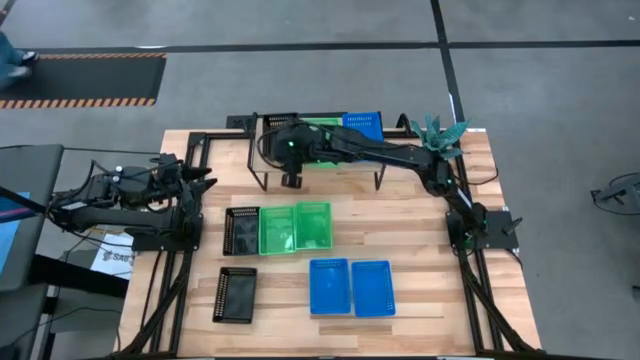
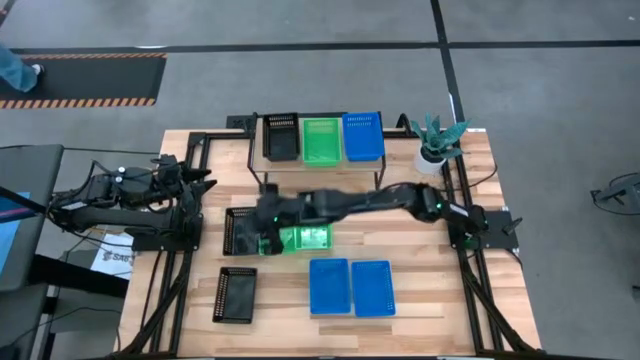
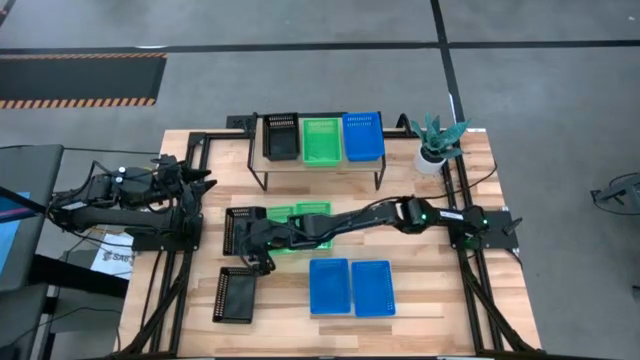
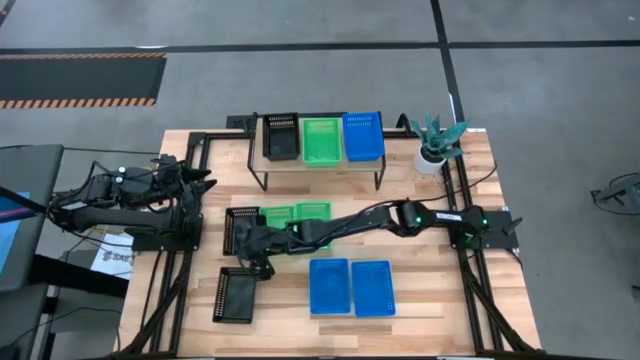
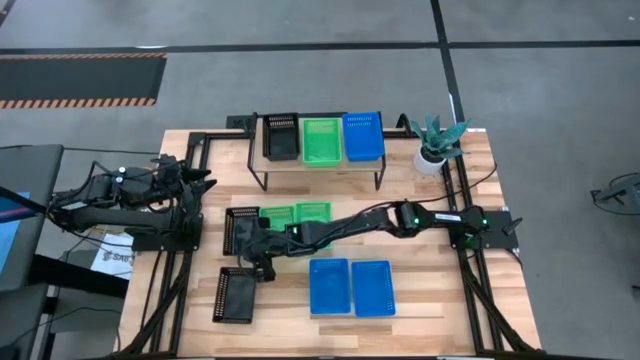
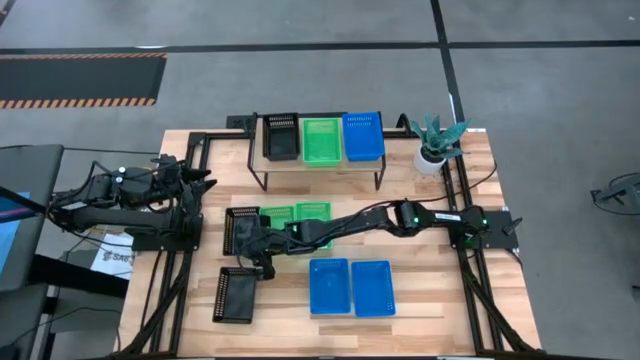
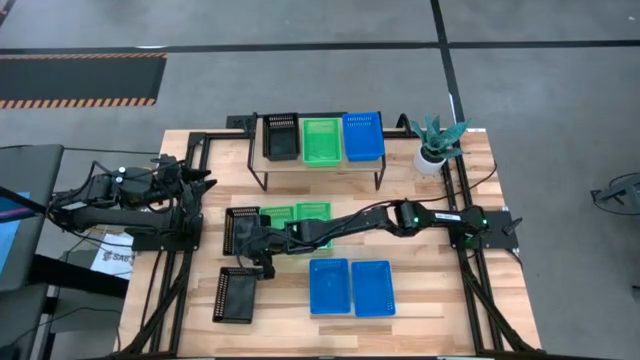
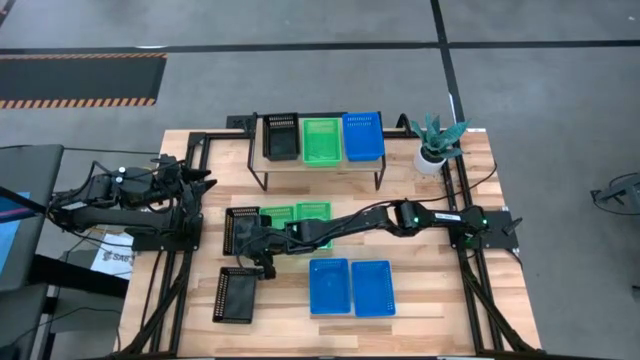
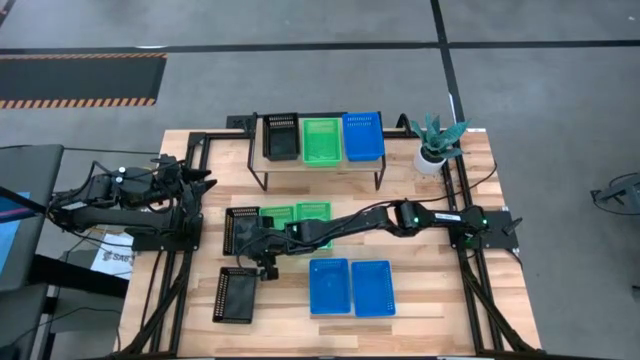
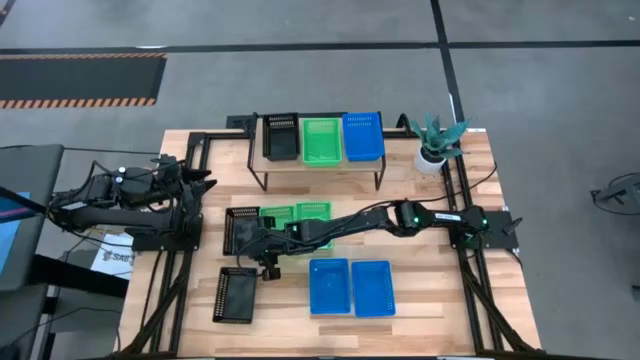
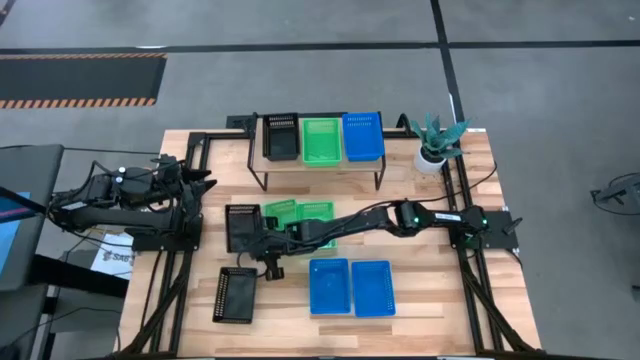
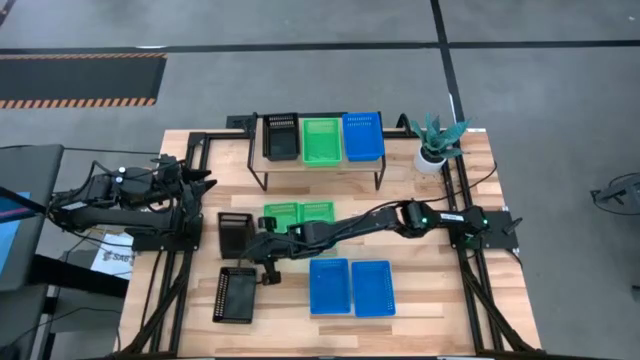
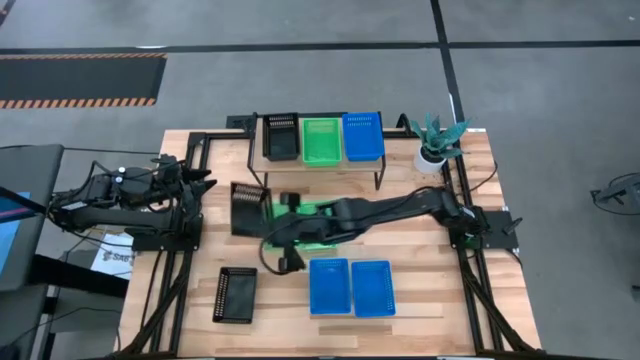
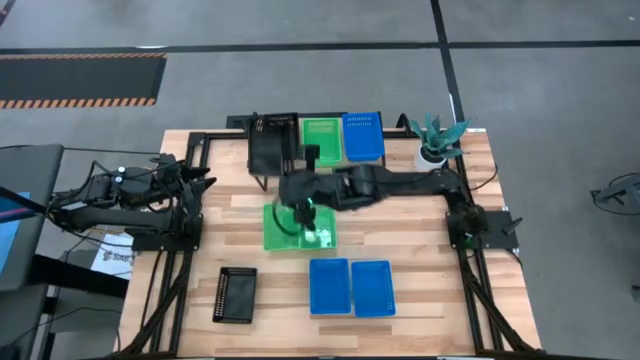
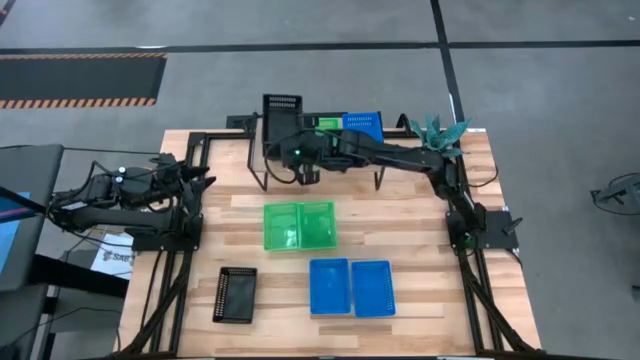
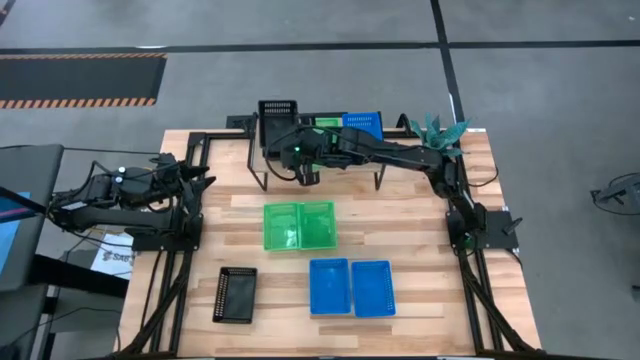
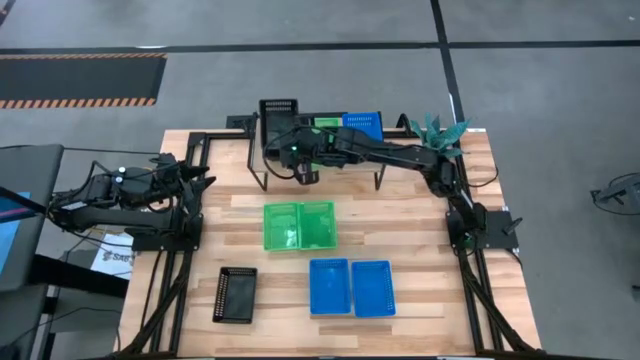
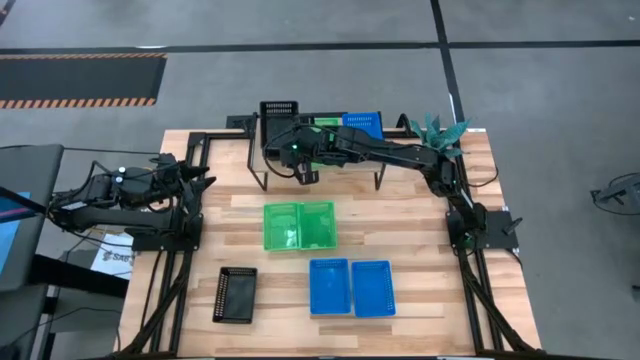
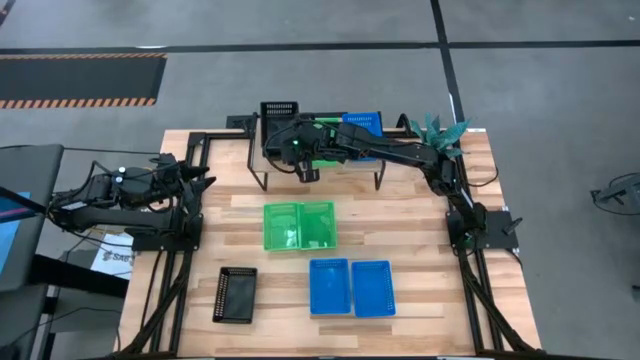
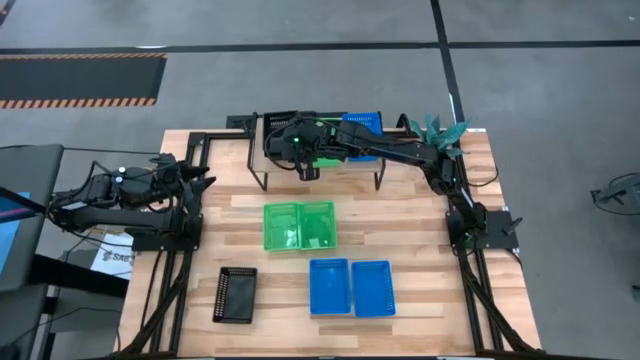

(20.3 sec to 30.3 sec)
Task: Stack baskets on shelf by color
Stack the top black bin on the black bin on the shelf

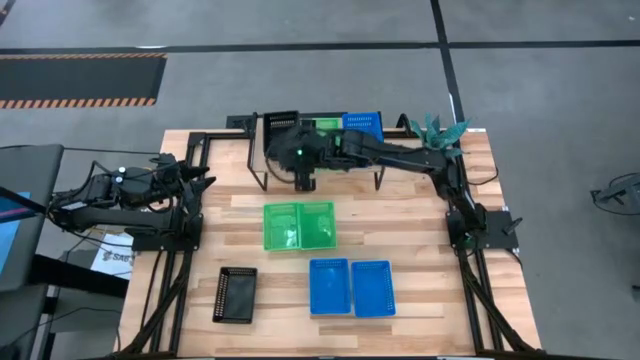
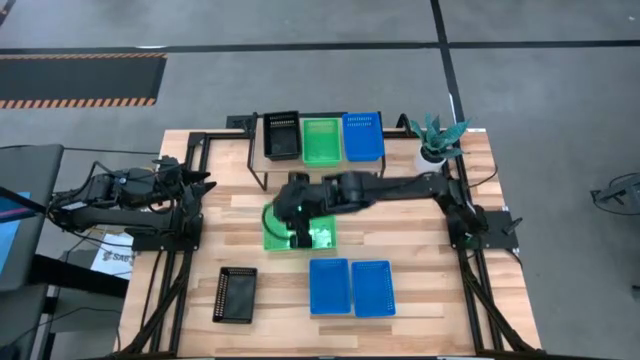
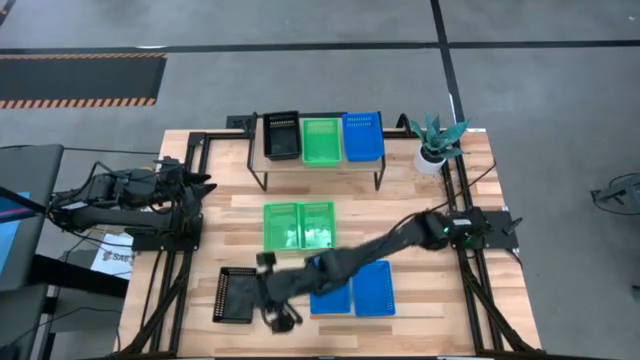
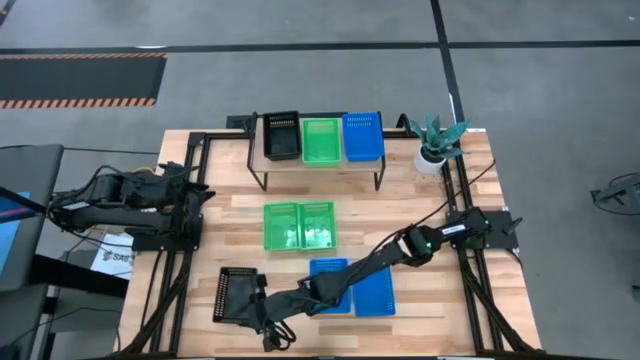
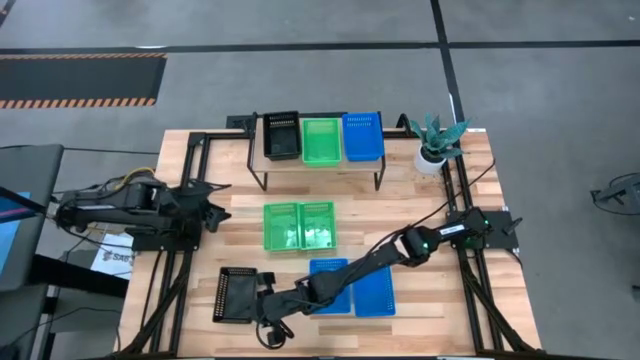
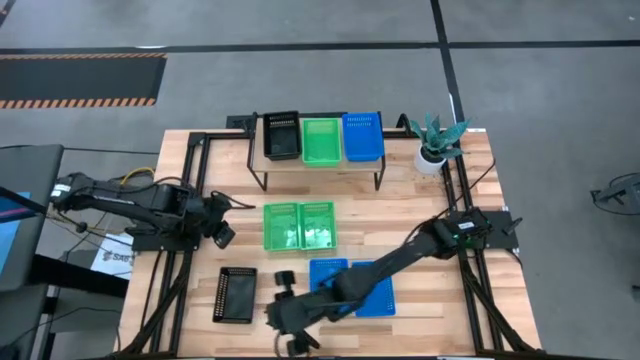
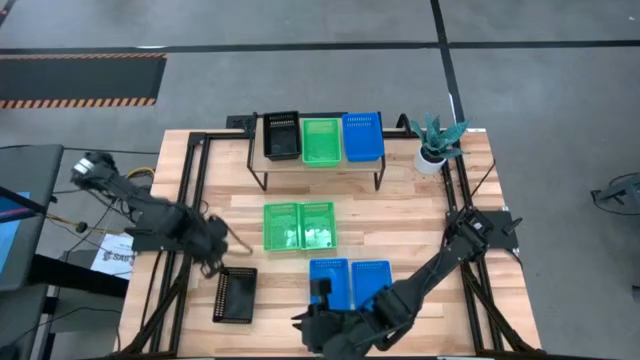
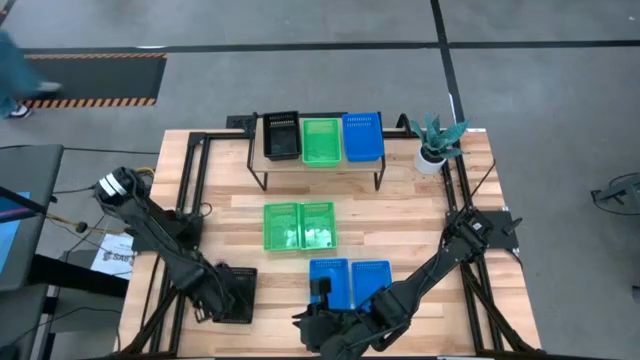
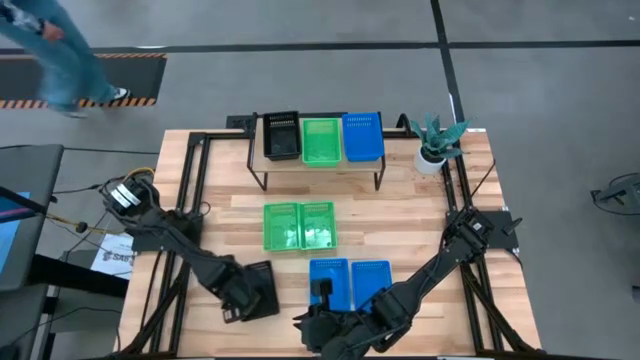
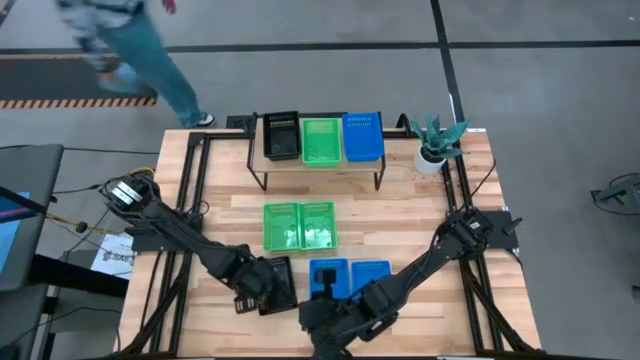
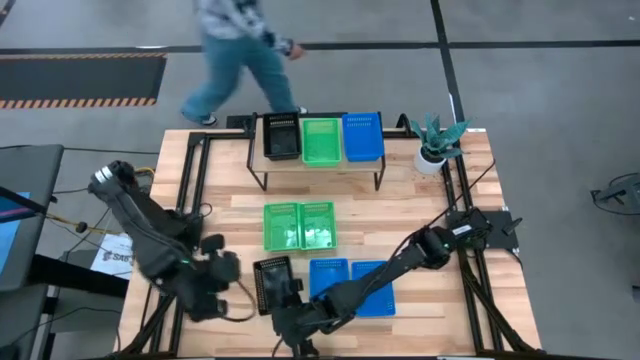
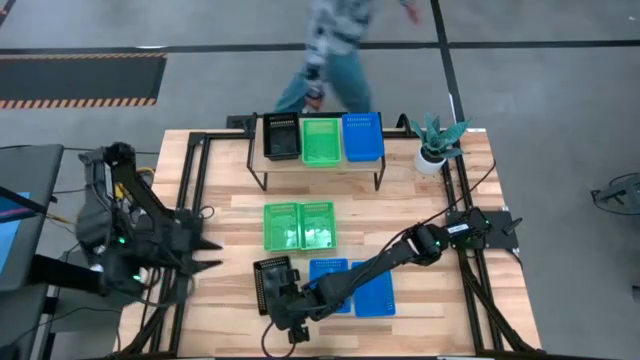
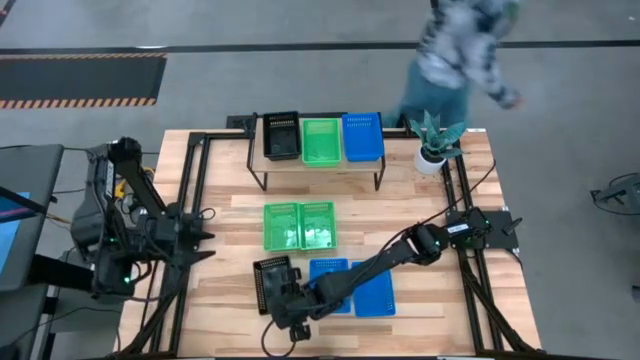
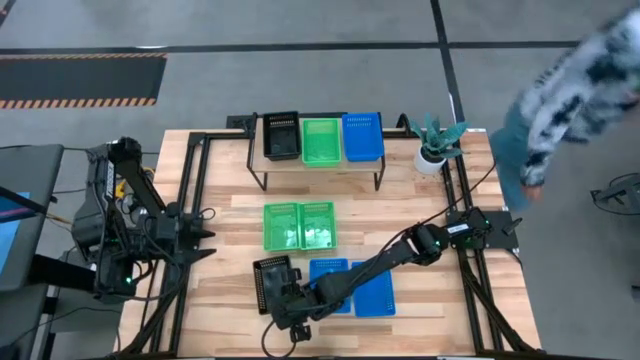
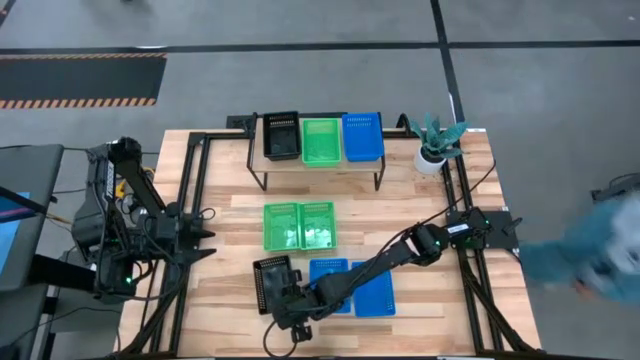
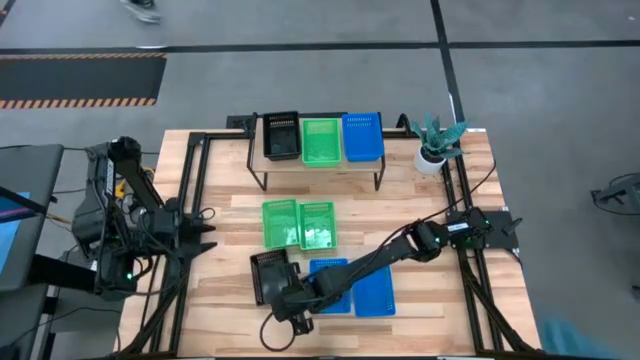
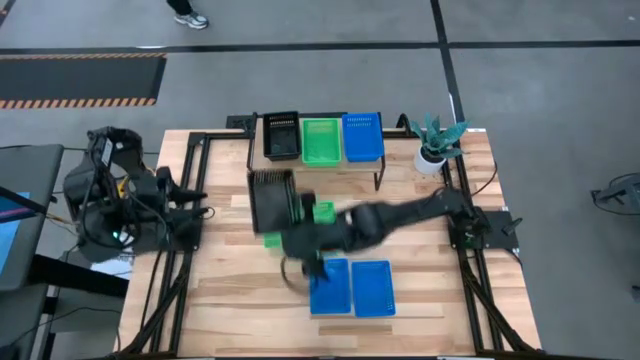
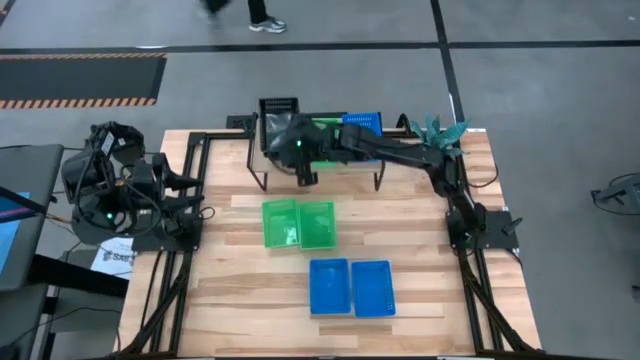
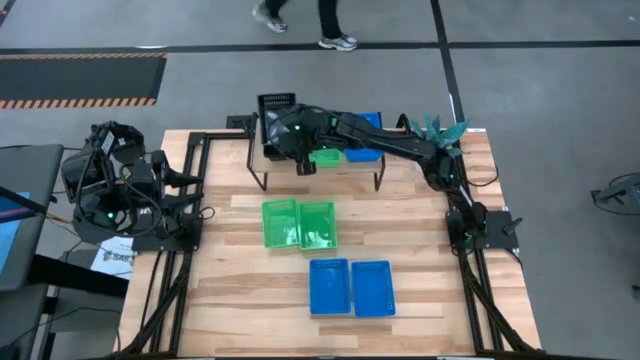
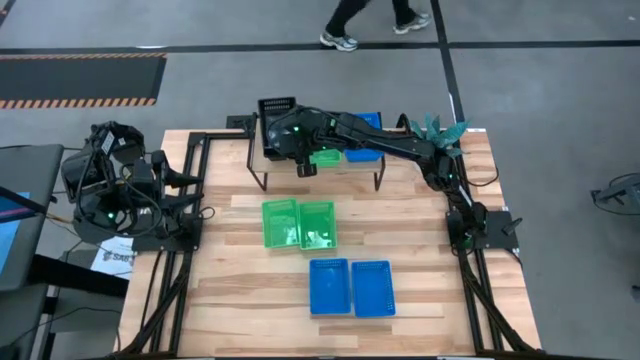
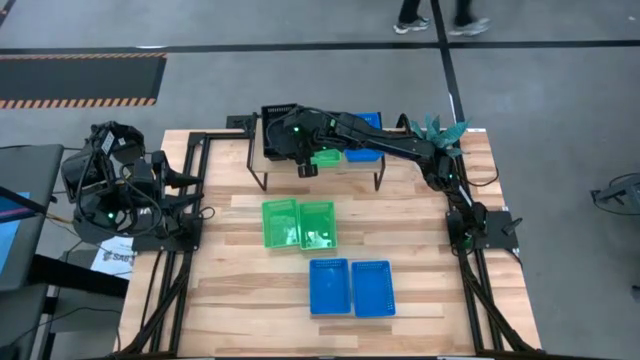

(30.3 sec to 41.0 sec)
Stack the black bin on the black bin on the shelf
